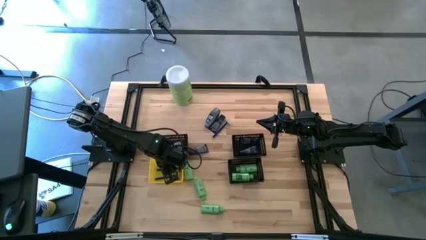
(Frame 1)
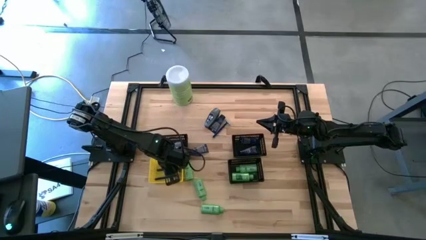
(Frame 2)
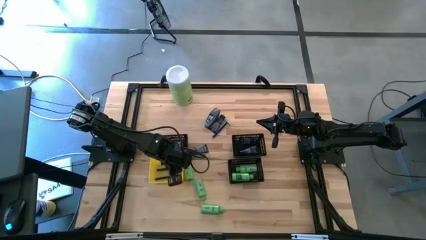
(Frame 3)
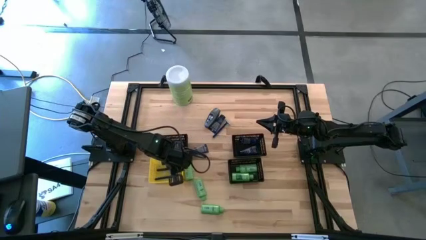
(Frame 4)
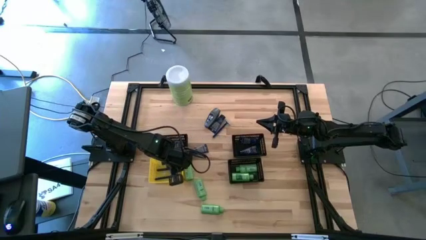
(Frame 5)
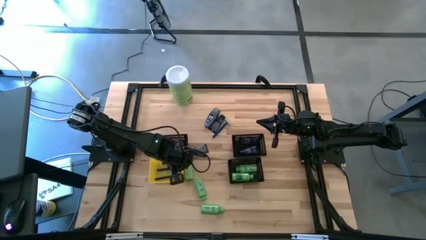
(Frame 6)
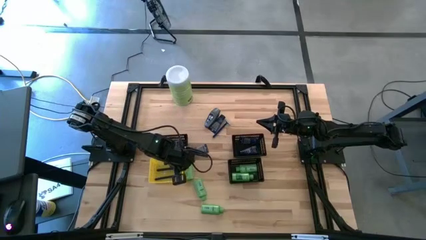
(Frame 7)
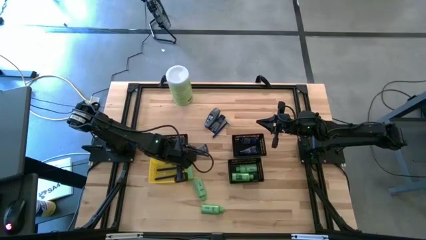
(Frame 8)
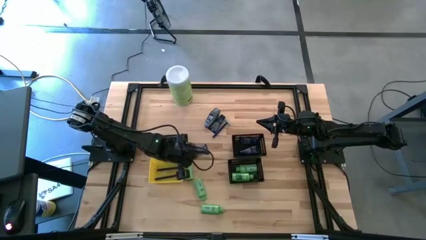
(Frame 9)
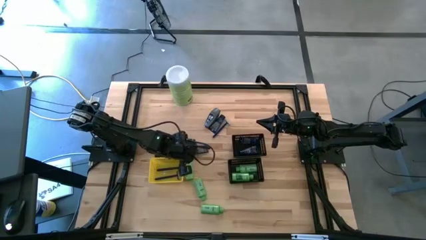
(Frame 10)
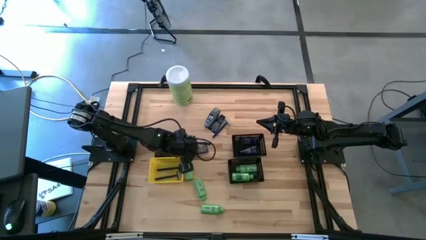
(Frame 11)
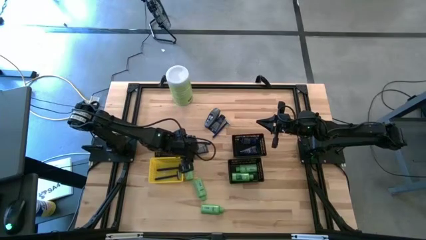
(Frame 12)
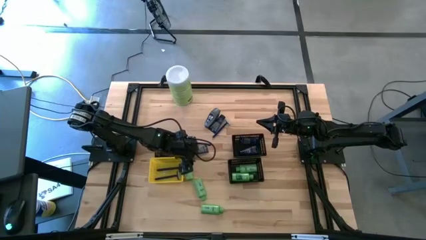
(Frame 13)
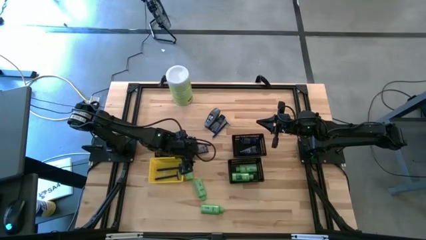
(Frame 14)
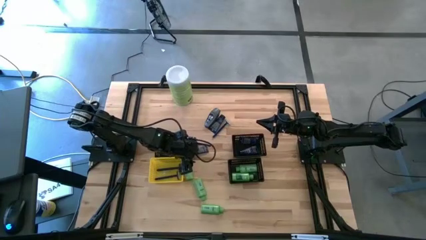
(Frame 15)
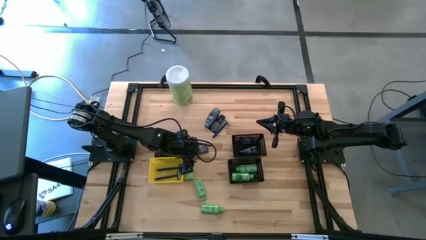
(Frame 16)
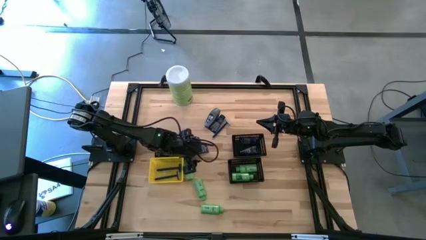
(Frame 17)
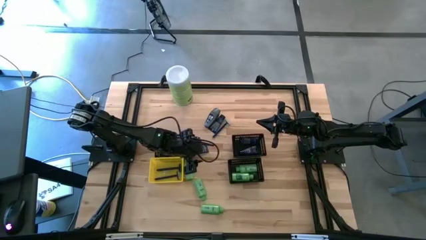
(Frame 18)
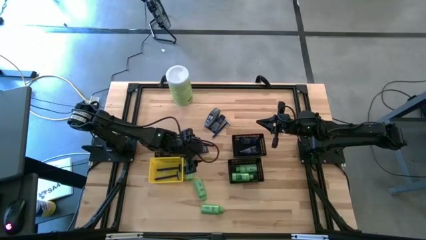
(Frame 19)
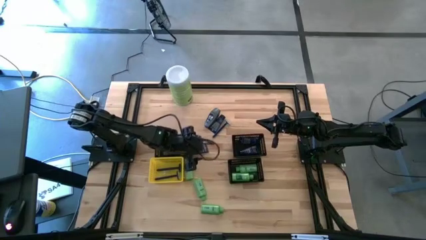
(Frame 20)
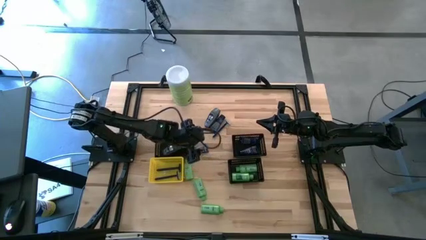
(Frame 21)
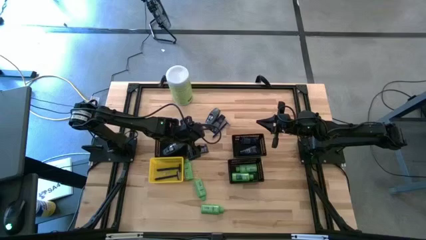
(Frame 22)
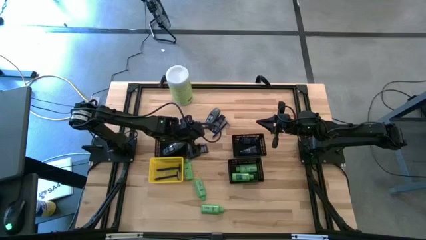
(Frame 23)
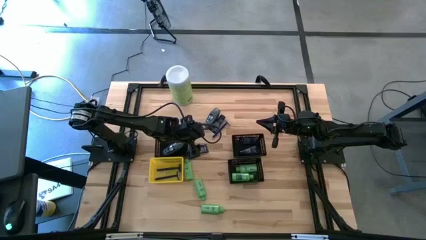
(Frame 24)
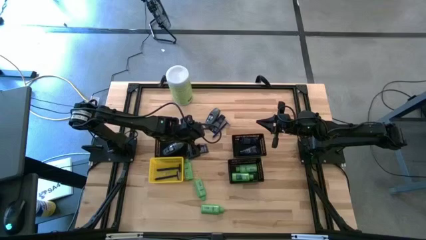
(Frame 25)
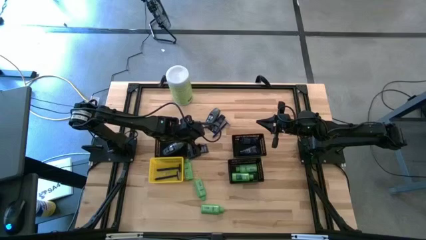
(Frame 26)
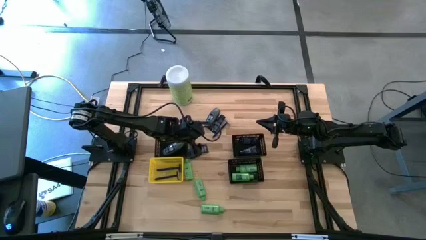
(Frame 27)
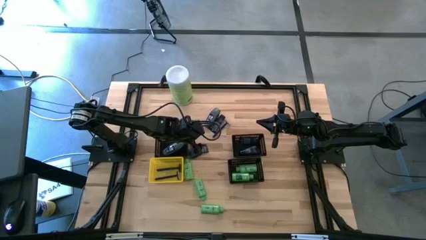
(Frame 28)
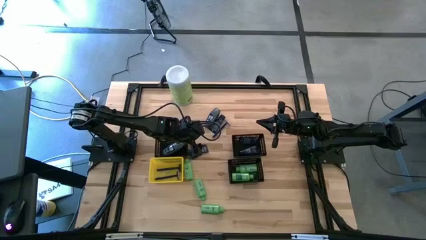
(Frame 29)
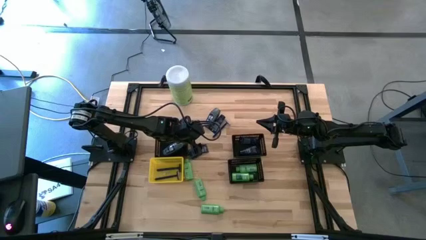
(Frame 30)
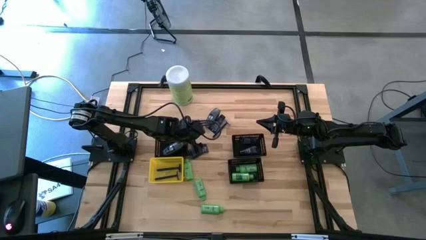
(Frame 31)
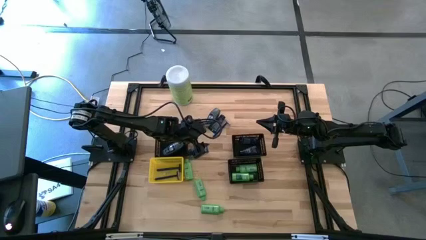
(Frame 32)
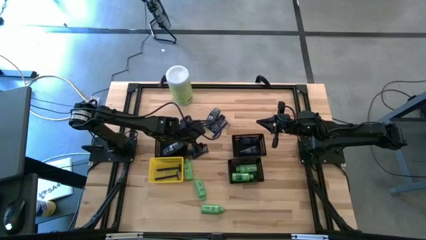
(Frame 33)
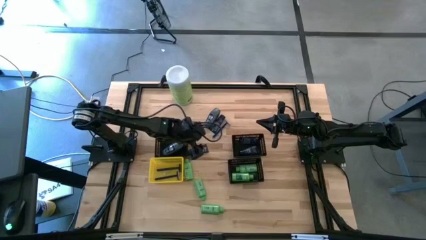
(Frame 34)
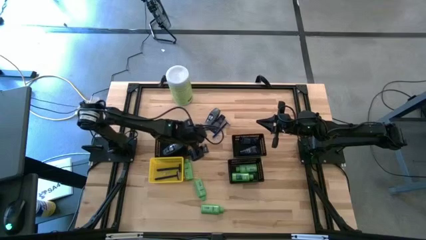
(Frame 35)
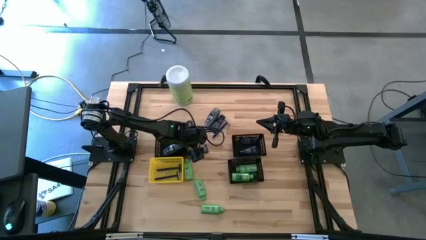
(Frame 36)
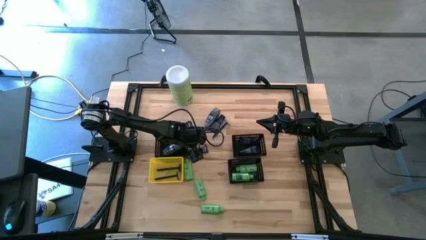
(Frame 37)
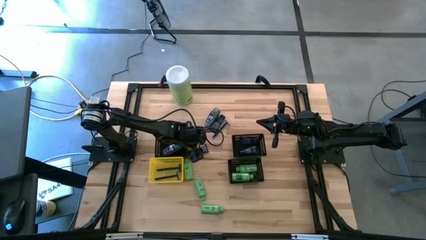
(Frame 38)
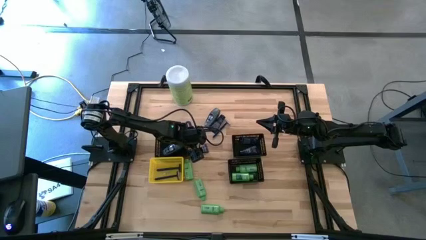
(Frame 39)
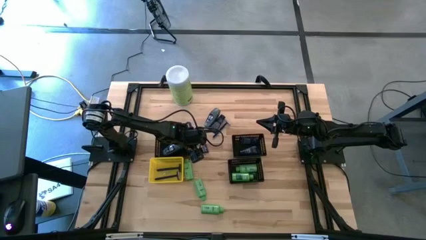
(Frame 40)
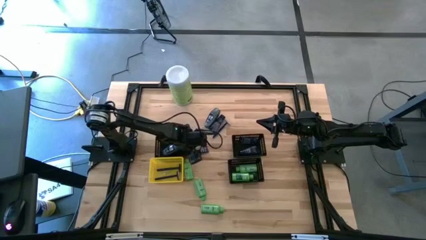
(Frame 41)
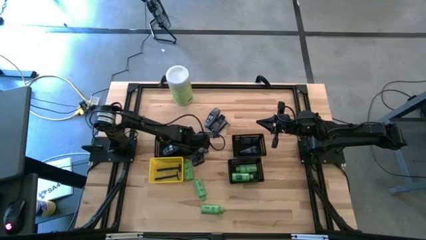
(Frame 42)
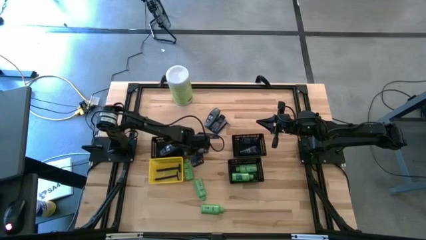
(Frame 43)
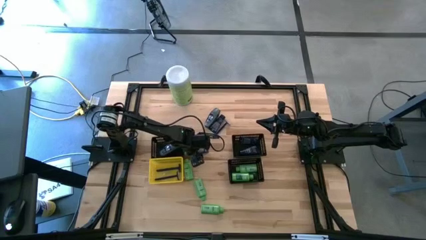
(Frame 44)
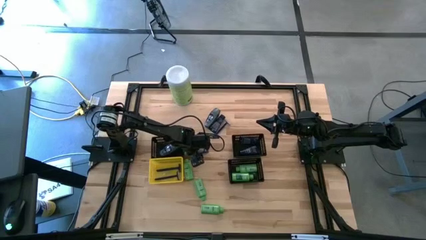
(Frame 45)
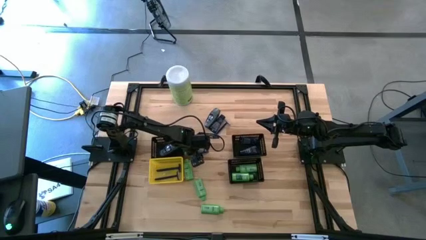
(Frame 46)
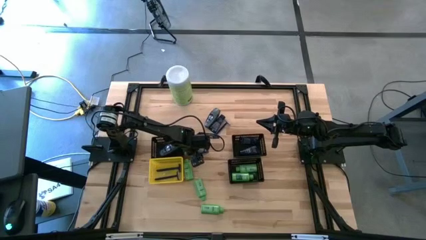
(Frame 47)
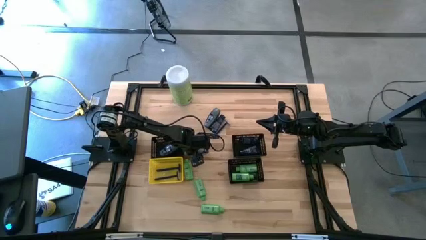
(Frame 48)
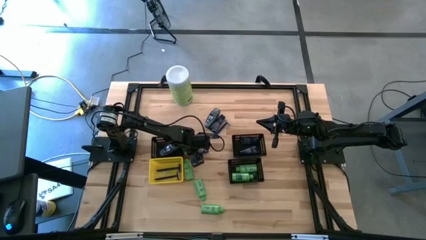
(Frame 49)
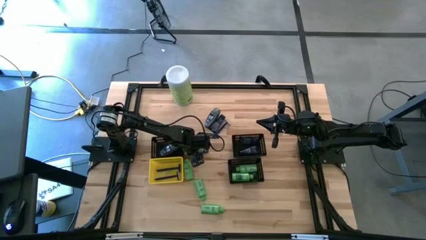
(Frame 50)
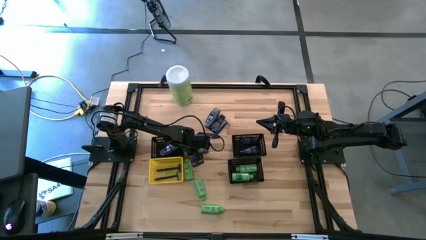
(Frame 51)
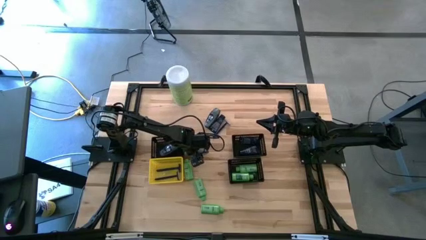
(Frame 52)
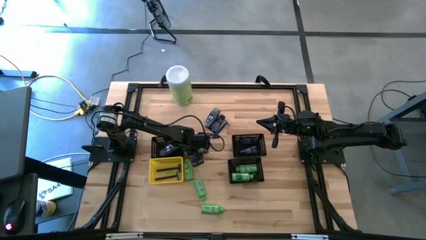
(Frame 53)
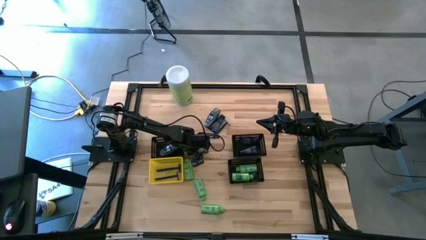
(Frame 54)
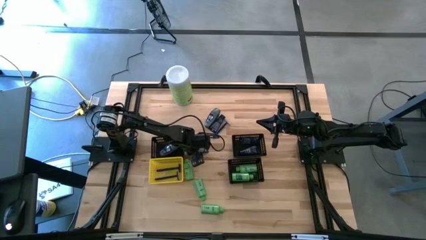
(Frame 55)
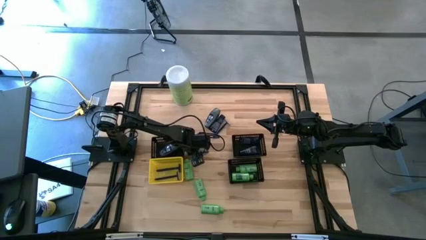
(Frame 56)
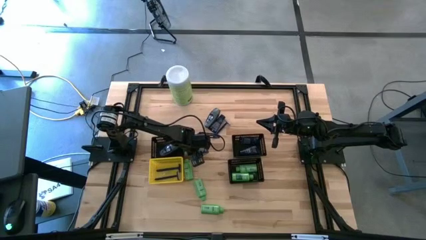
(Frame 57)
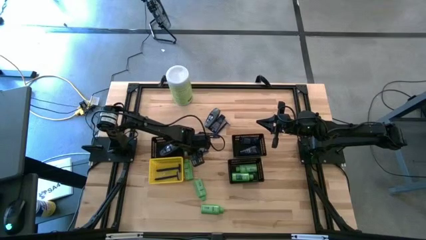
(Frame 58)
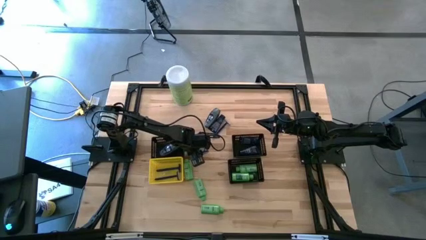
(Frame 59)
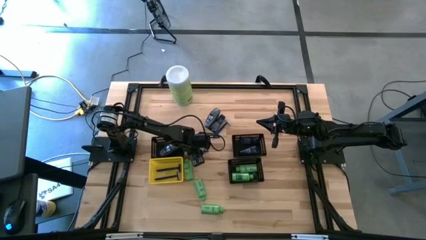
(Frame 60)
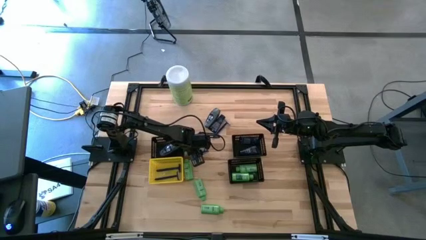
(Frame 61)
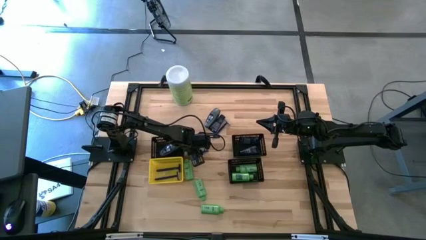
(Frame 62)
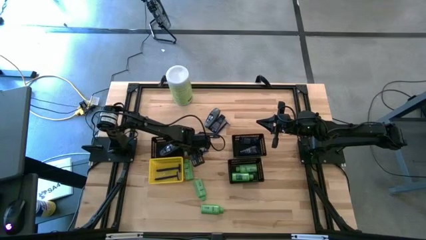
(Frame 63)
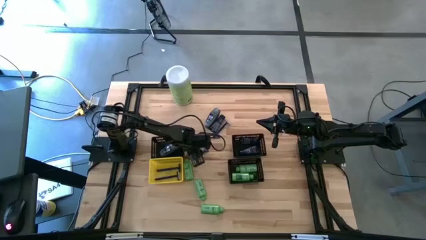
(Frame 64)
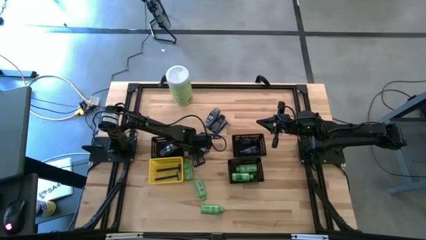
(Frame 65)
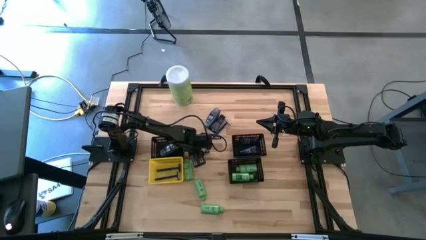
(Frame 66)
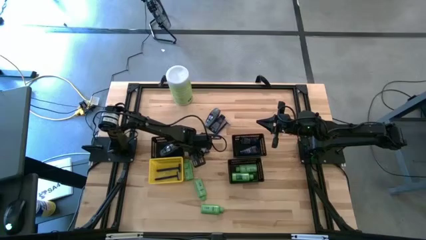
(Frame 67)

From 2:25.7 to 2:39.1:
Task: Pick & Place Travel size toiletries
Put the blue shave cream tub into the top right black bin
